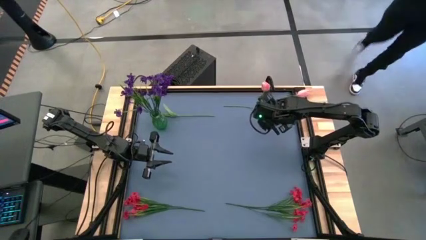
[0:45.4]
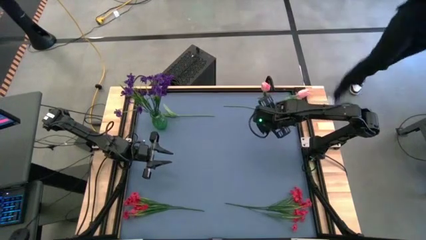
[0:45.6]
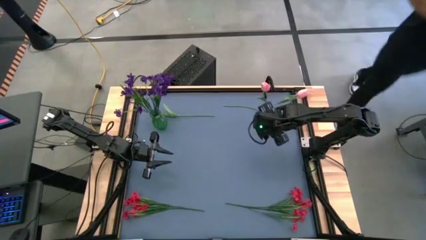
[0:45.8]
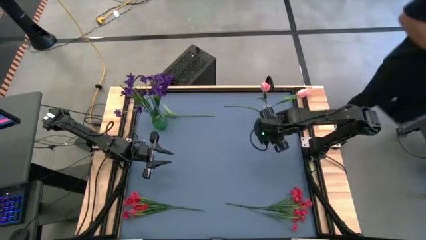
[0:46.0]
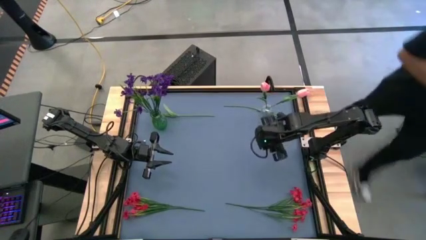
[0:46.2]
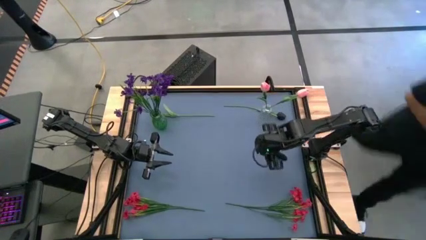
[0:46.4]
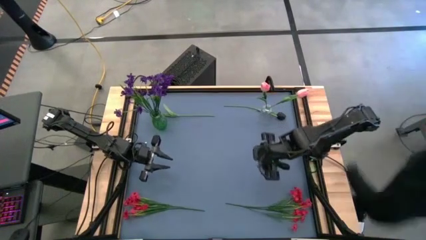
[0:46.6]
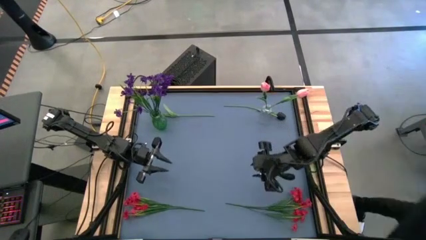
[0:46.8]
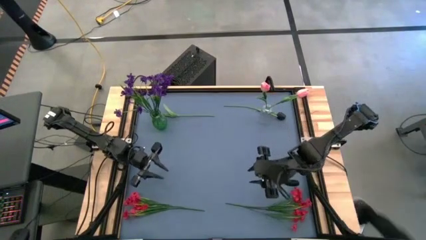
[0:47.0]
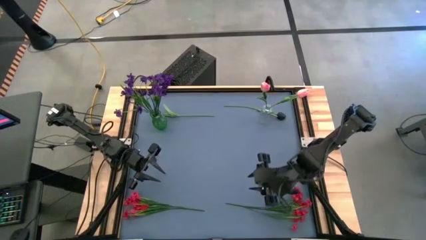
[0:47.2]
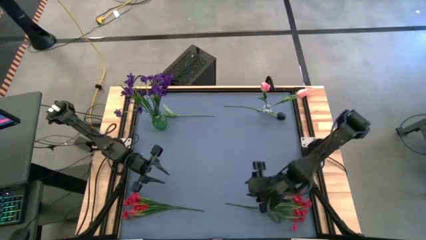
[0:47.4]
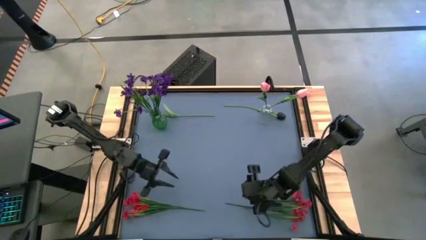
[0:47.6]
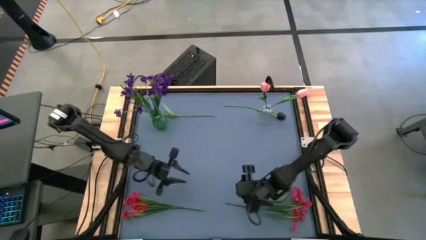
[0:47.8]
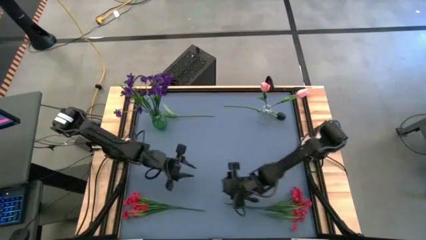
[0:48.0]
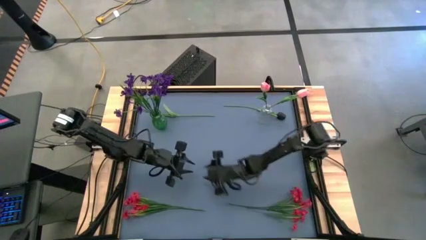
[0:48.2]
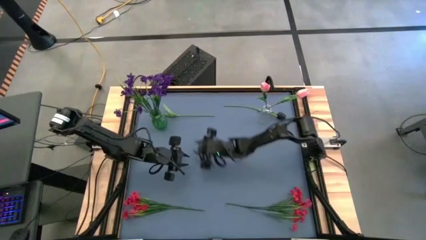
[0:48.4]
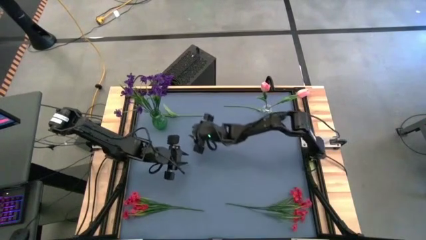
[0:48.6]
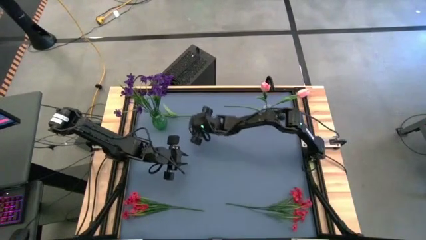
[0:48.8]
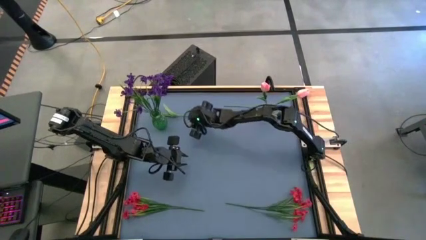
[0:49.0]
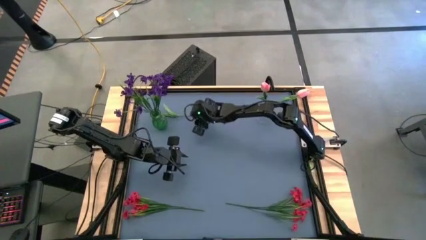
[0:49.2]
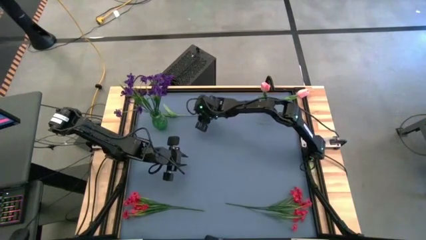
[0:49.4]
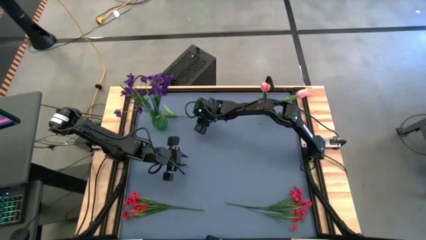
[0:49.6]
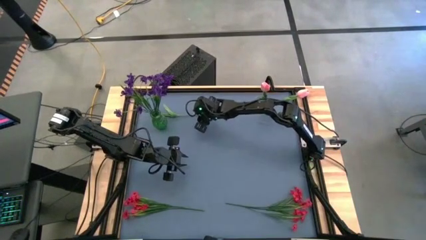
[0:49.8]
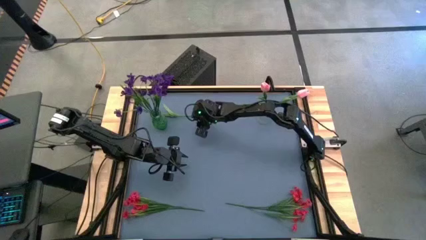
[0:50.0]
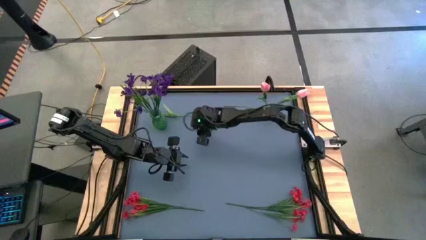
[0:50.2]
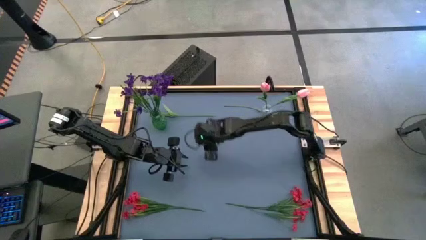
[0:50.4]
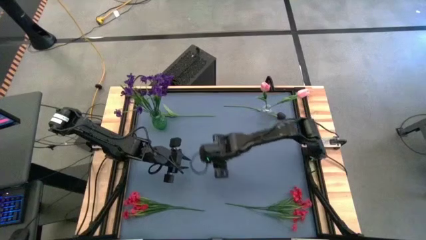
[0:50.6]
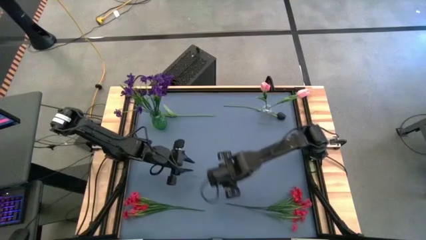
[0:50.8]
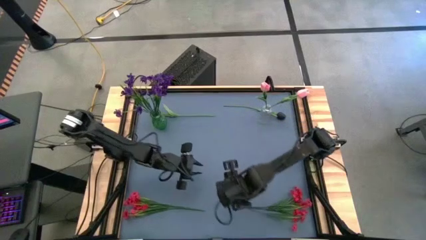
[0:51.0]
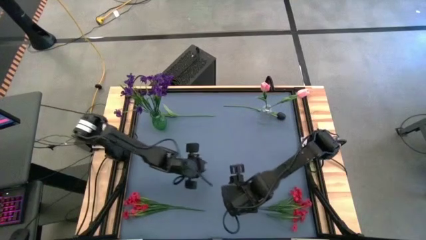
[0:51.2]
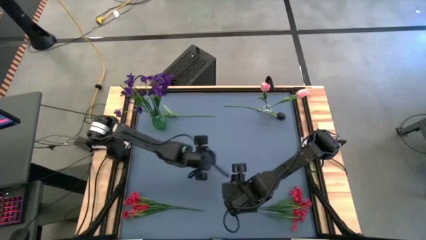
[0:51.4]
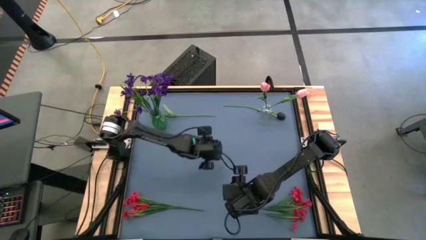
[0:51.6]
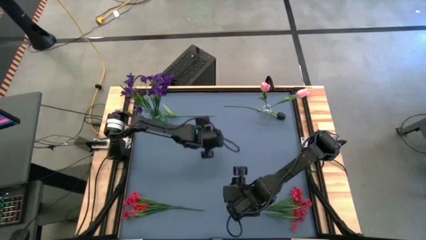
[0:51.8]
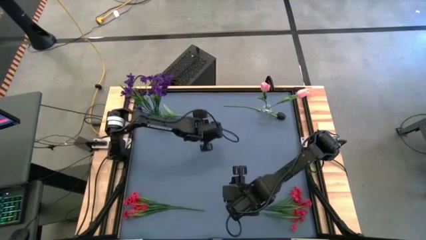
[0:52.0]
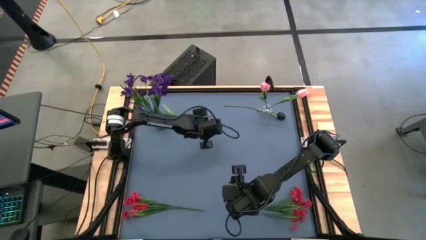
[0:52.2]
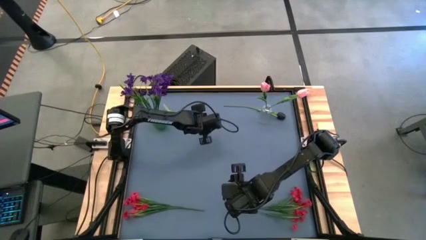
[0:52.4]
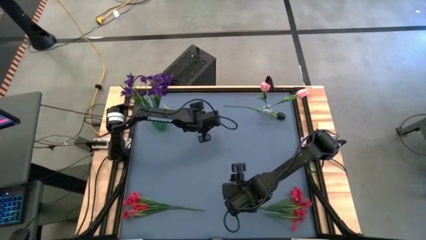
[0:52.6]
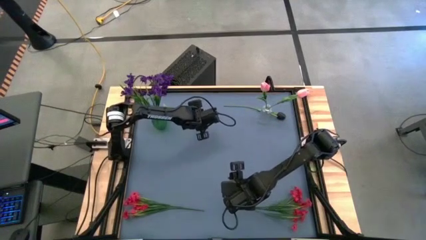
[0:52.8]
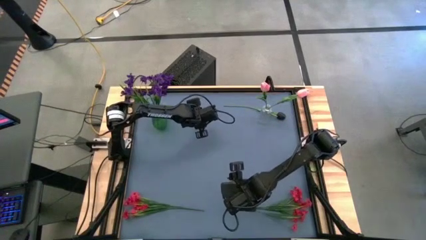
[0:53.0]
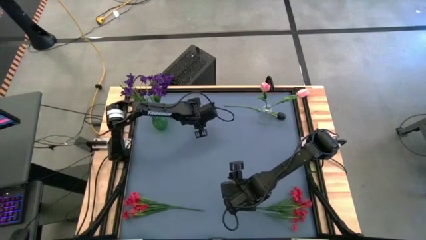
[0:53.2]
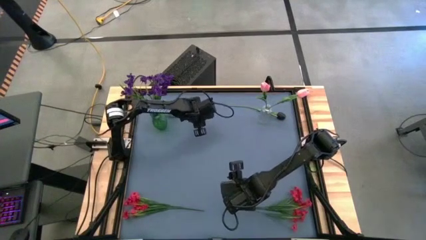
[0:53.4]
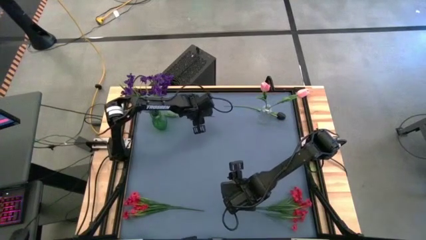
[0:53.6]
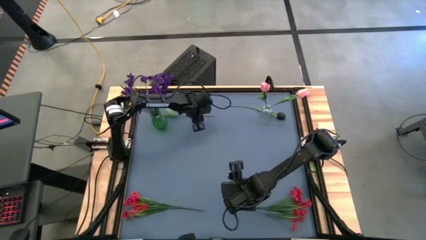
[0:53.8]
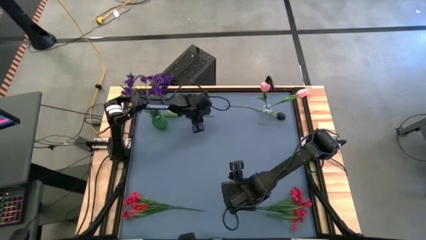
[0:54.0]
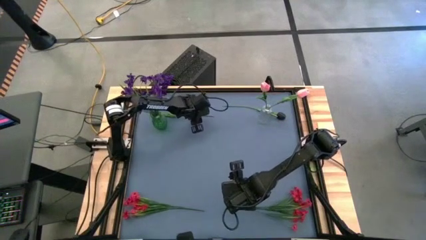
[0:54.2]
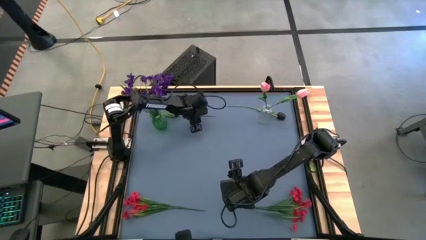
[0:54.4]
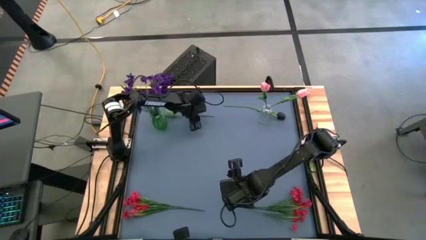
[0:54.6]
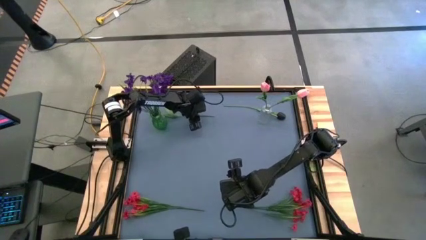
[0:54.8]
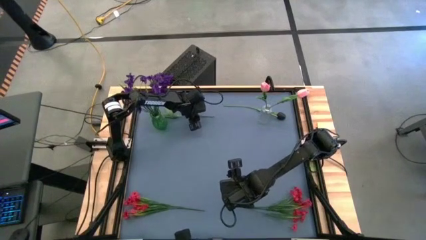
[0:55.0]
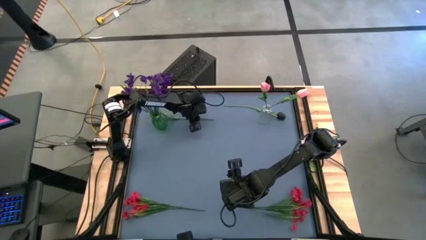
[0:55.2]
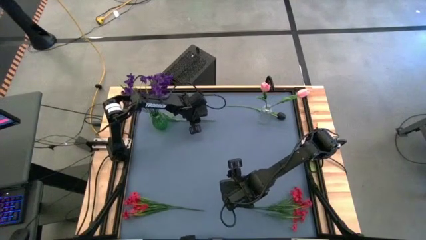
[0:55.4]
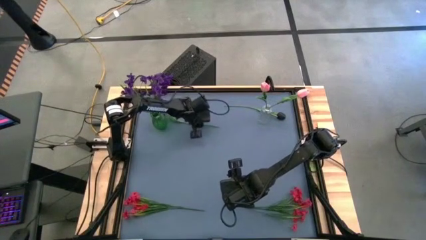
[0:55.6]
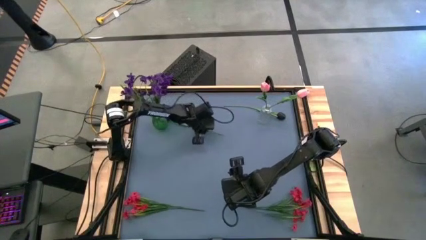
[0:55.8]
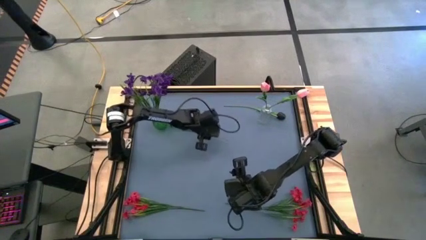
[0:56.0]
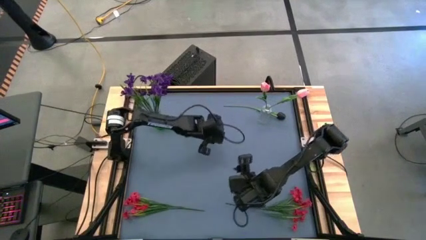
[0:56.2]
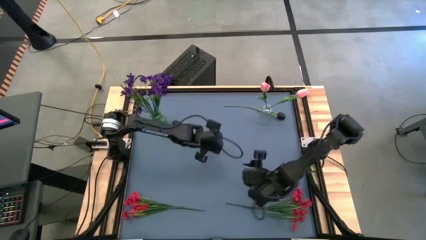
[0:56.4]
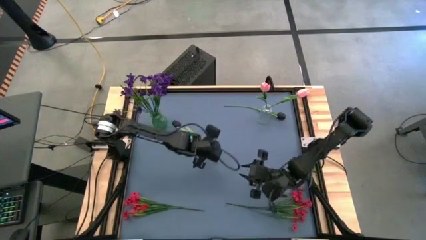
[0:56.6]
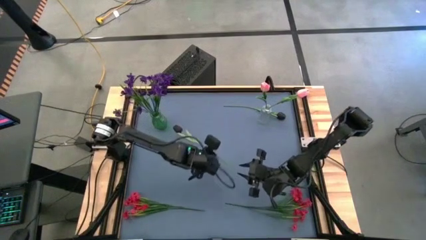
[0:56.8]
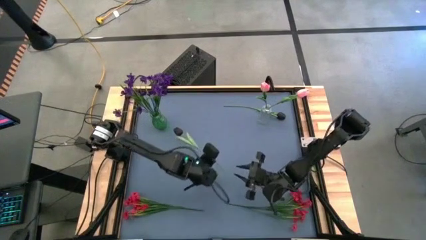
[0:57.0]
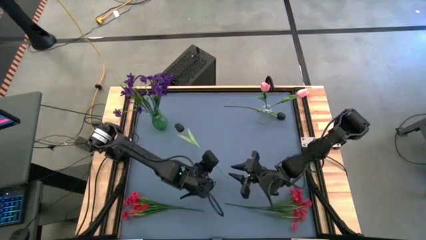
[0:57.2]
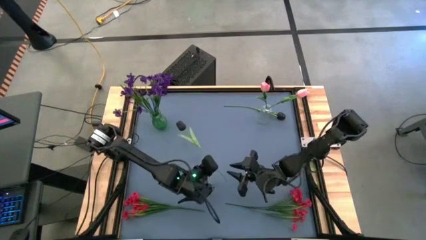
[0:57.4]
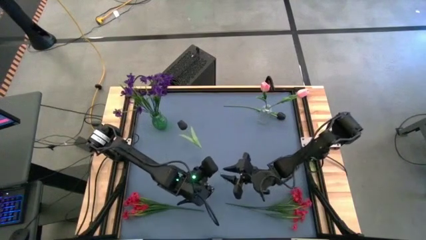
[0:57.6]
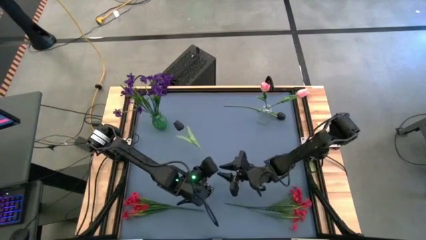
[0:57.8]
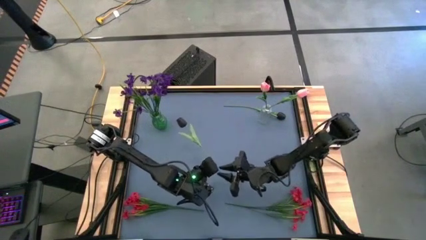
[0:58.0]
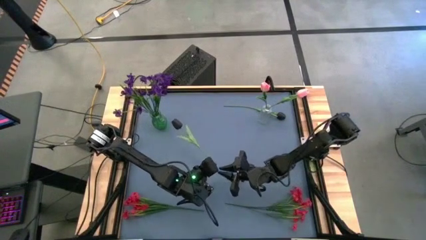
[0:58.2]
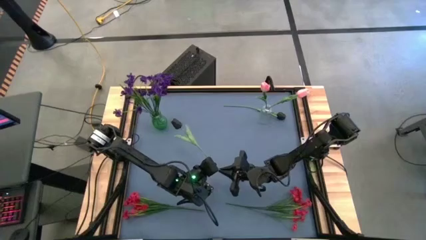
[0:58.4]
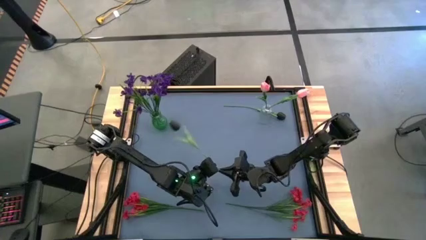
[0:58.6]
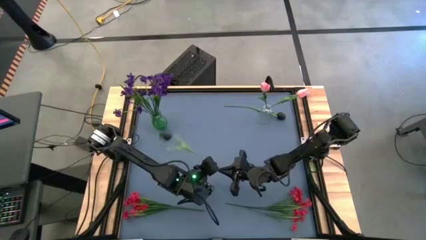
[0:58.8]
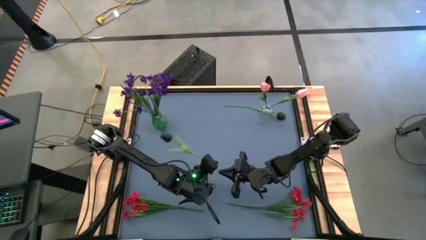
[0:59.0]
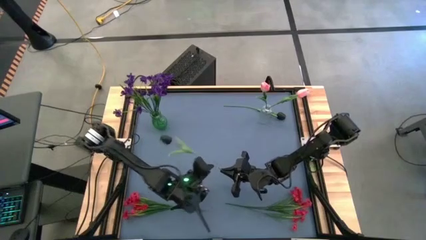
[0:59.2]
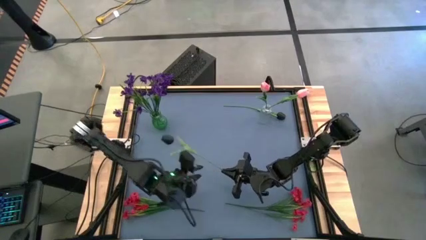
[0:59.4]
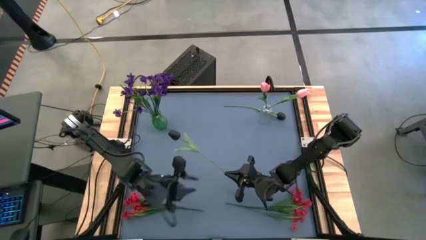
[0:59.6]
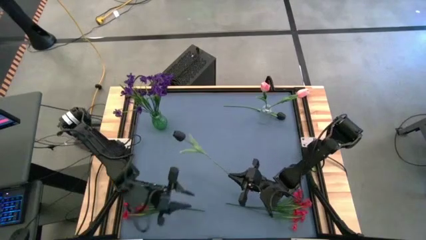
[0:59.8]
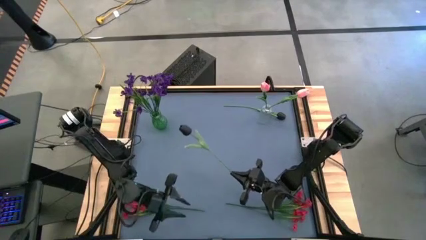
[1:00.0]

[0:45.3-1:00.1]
Task: Sort flowers into vase by color
Put the left black flower into the green vase
